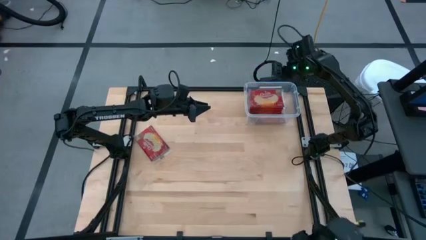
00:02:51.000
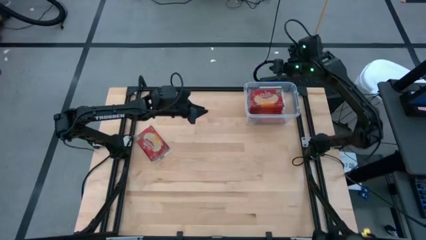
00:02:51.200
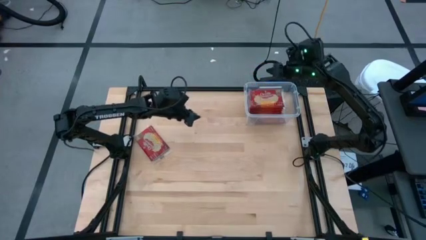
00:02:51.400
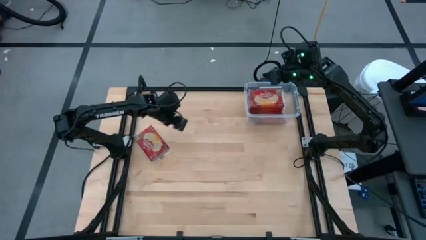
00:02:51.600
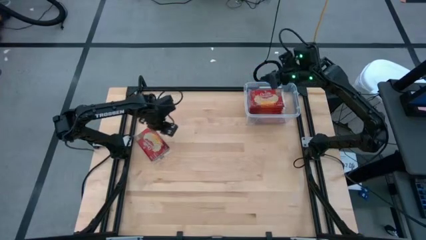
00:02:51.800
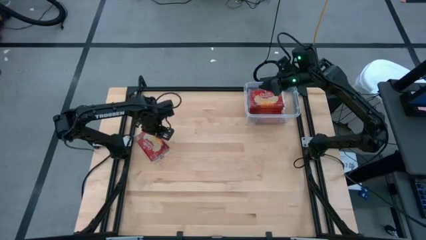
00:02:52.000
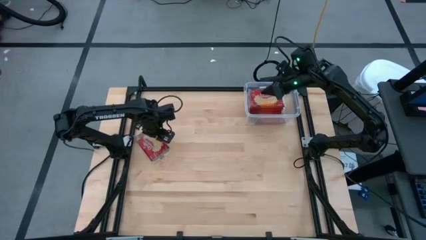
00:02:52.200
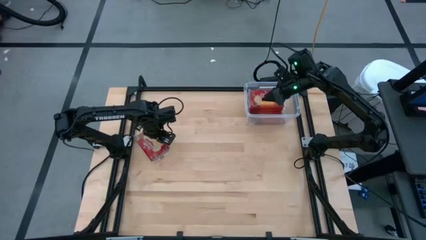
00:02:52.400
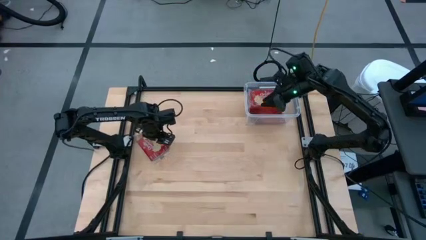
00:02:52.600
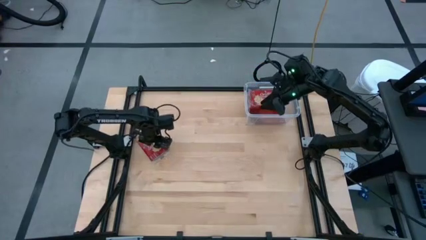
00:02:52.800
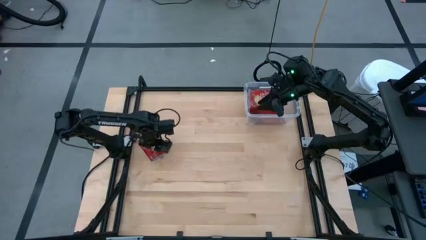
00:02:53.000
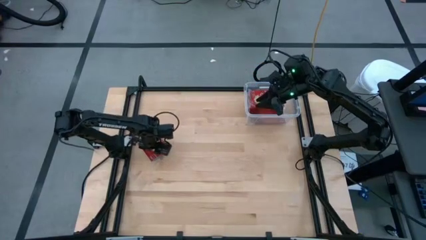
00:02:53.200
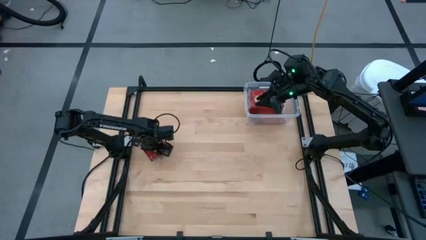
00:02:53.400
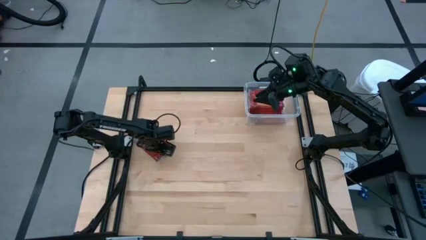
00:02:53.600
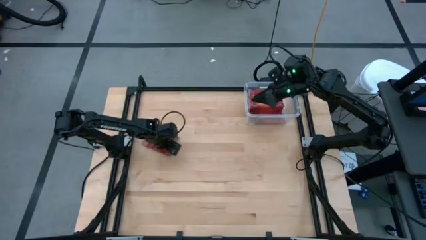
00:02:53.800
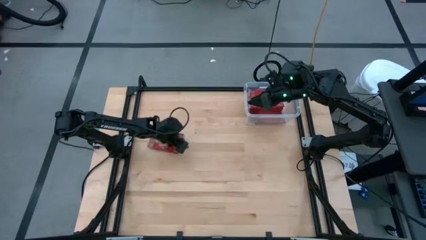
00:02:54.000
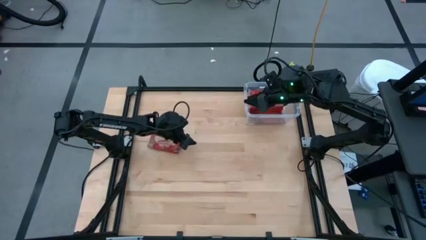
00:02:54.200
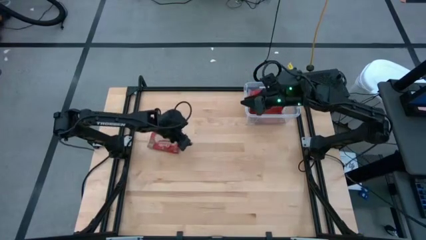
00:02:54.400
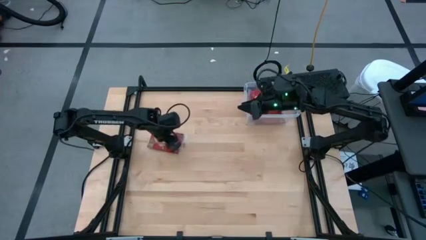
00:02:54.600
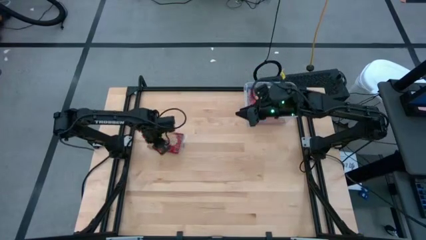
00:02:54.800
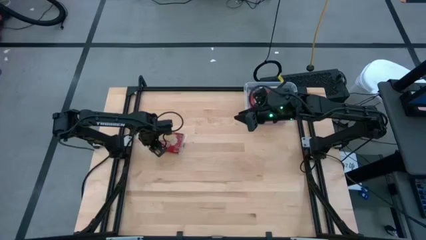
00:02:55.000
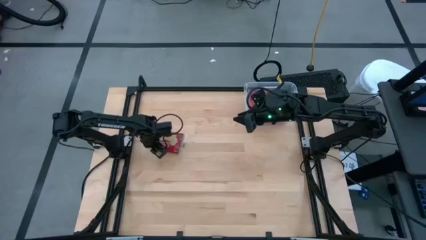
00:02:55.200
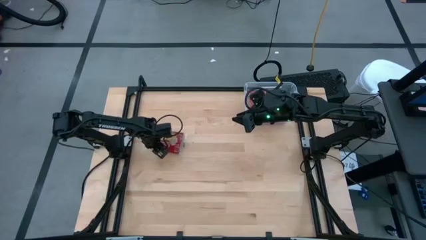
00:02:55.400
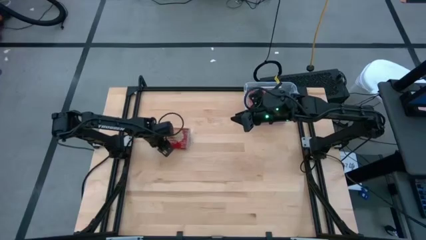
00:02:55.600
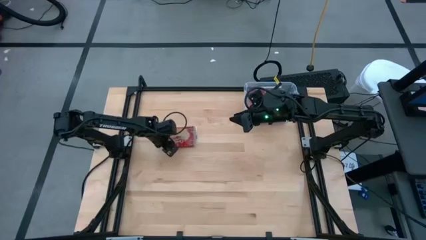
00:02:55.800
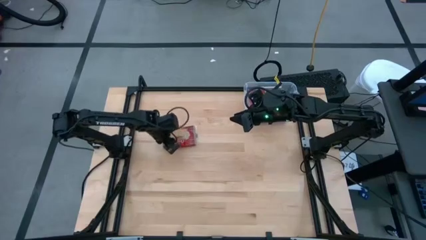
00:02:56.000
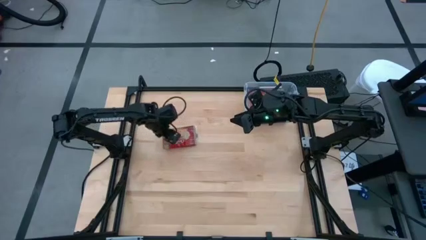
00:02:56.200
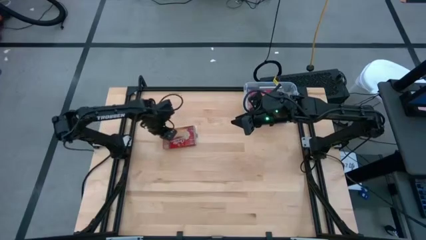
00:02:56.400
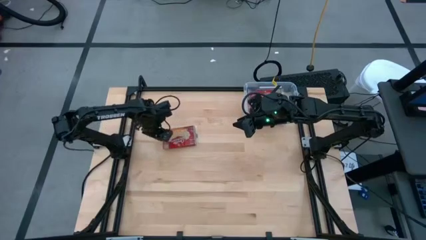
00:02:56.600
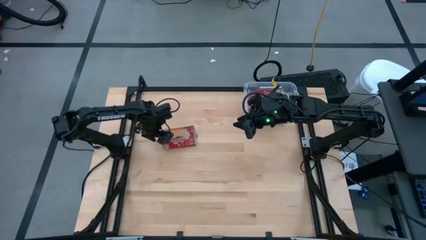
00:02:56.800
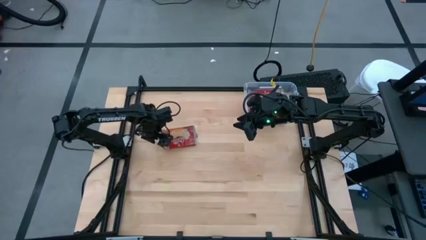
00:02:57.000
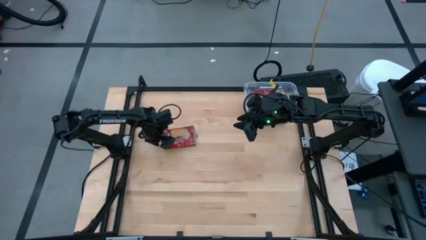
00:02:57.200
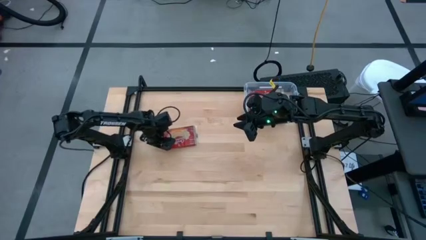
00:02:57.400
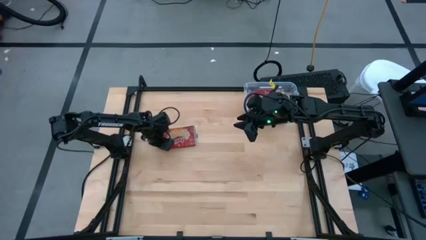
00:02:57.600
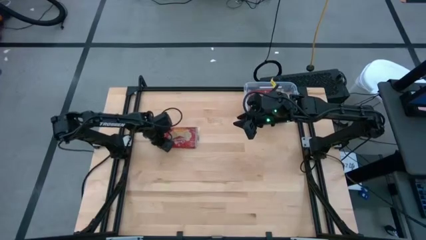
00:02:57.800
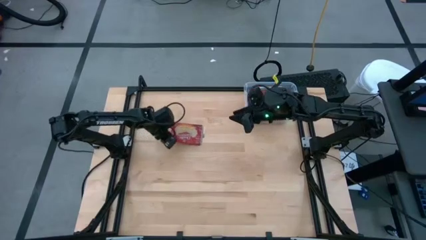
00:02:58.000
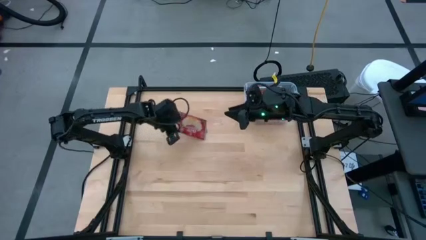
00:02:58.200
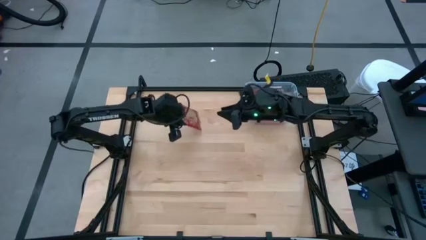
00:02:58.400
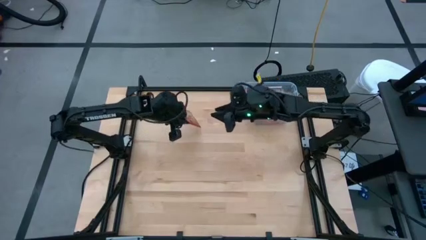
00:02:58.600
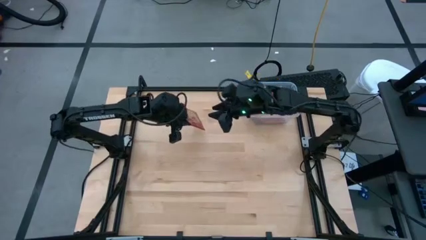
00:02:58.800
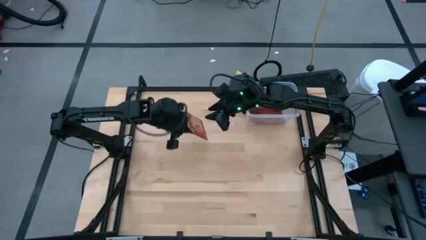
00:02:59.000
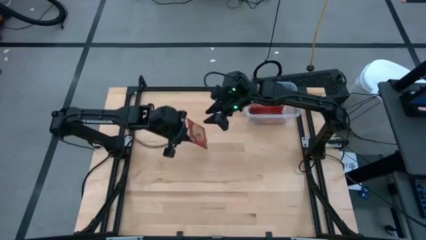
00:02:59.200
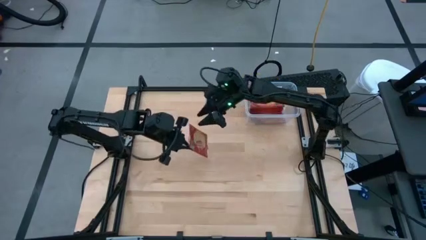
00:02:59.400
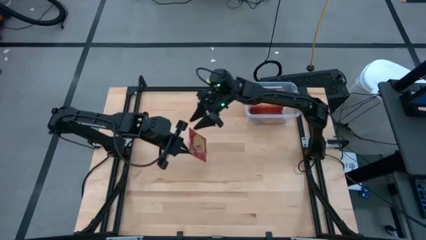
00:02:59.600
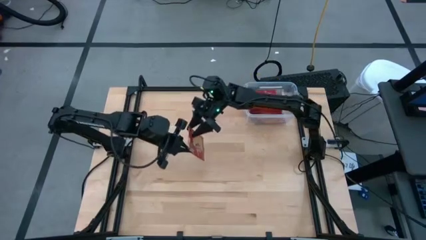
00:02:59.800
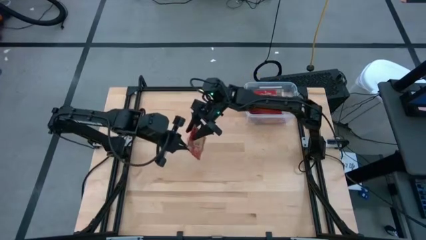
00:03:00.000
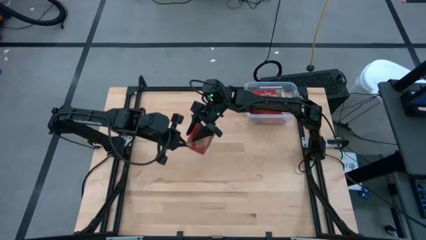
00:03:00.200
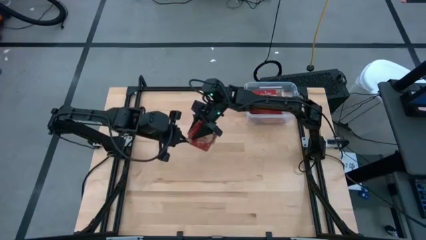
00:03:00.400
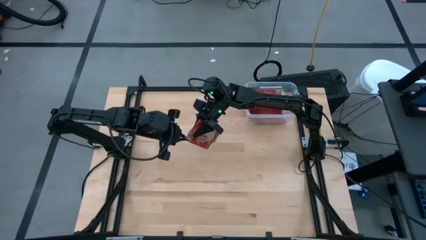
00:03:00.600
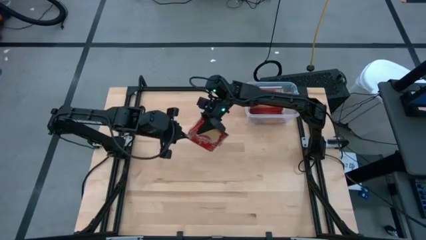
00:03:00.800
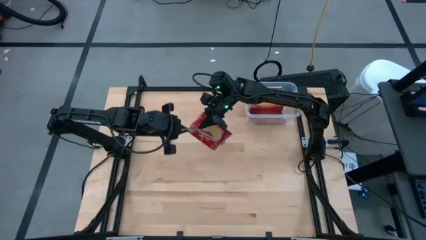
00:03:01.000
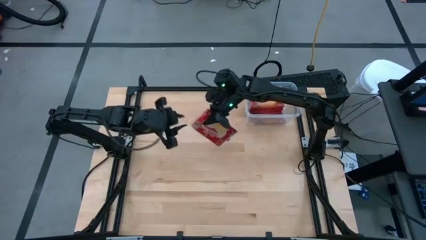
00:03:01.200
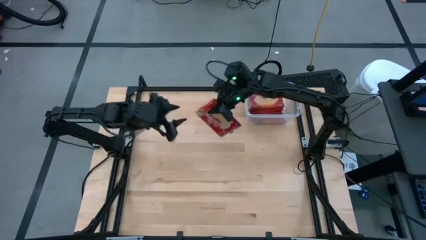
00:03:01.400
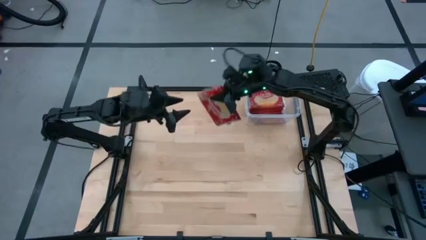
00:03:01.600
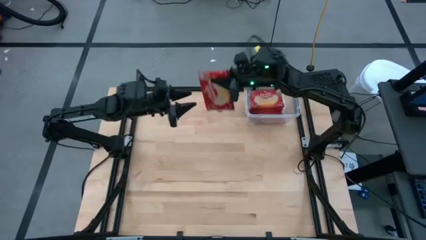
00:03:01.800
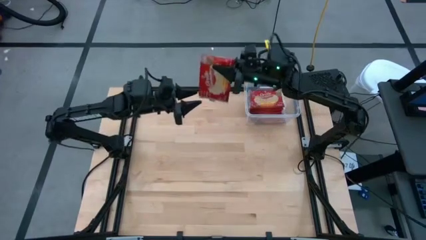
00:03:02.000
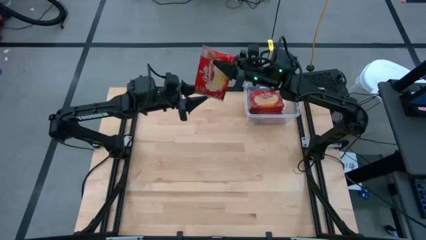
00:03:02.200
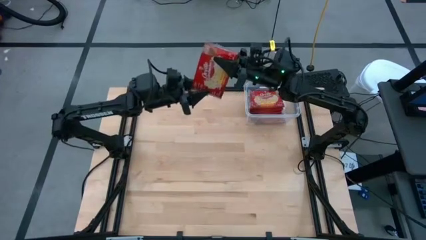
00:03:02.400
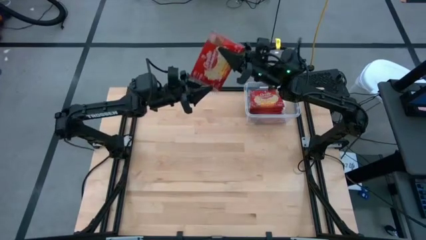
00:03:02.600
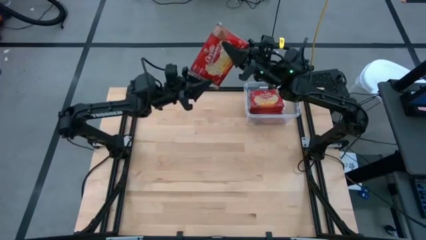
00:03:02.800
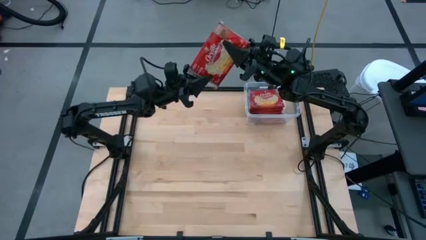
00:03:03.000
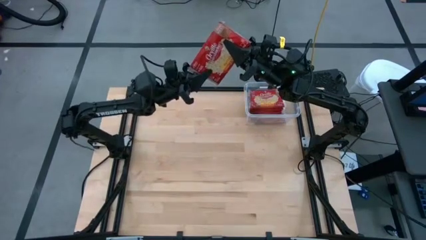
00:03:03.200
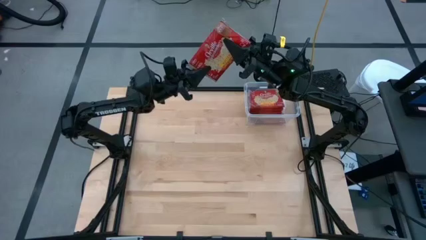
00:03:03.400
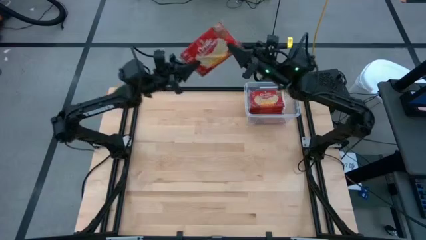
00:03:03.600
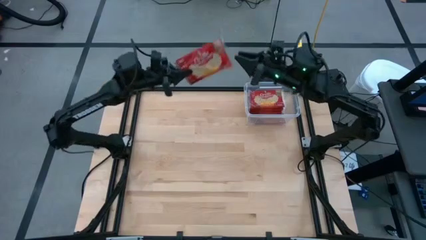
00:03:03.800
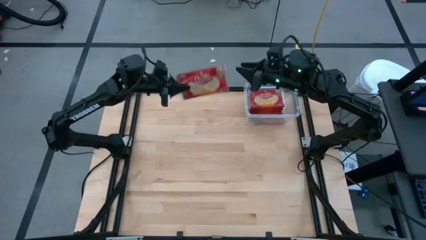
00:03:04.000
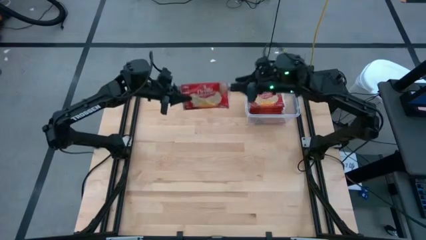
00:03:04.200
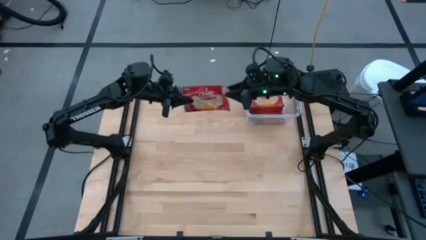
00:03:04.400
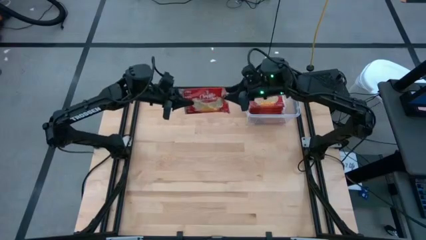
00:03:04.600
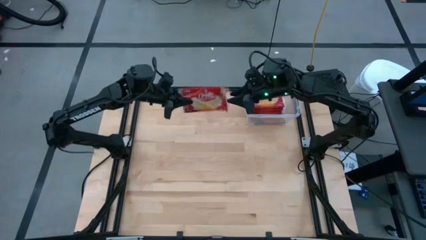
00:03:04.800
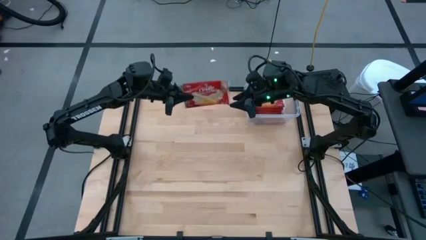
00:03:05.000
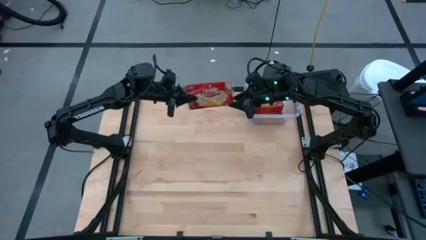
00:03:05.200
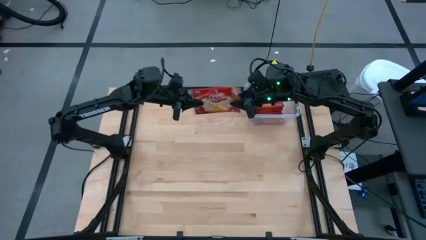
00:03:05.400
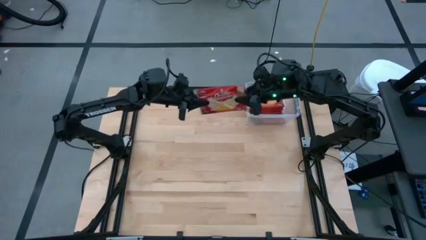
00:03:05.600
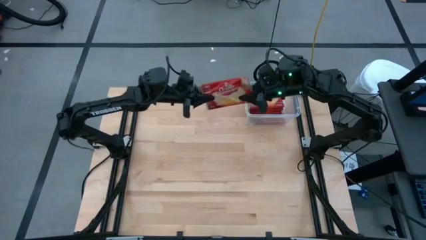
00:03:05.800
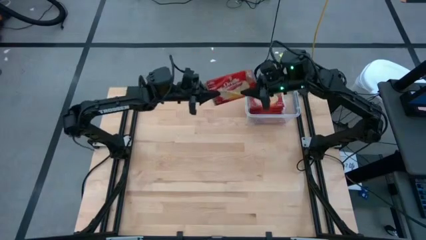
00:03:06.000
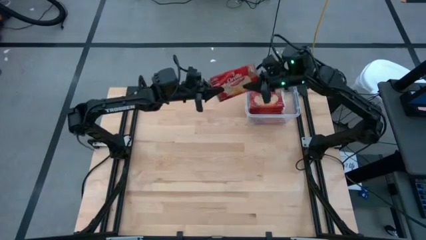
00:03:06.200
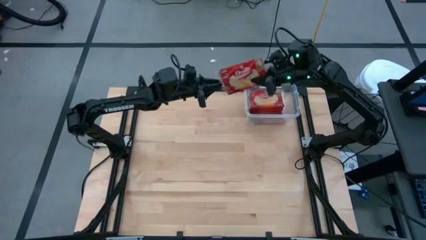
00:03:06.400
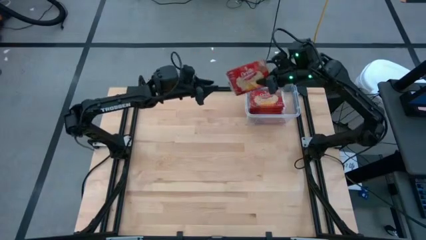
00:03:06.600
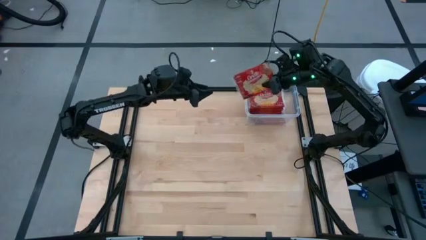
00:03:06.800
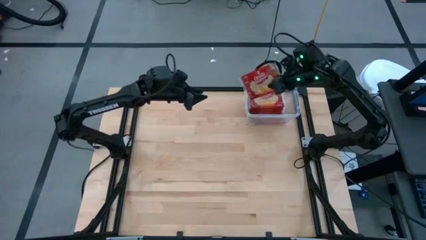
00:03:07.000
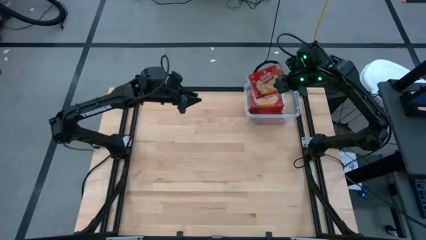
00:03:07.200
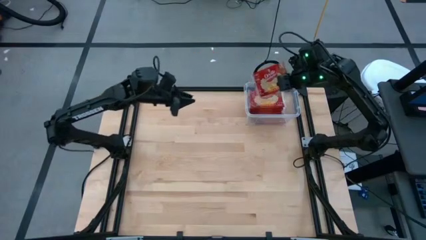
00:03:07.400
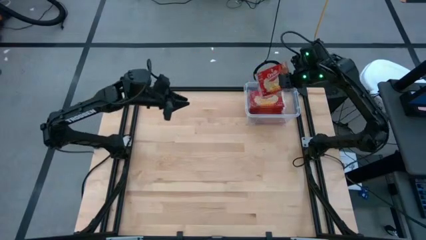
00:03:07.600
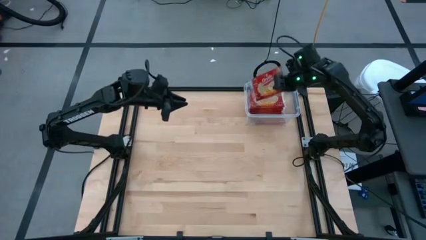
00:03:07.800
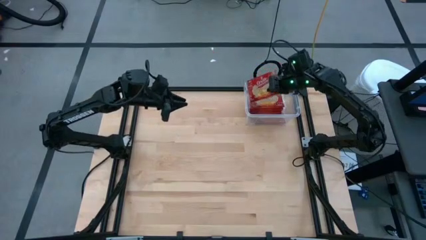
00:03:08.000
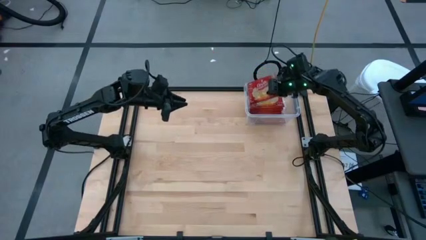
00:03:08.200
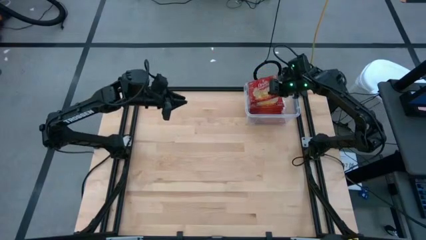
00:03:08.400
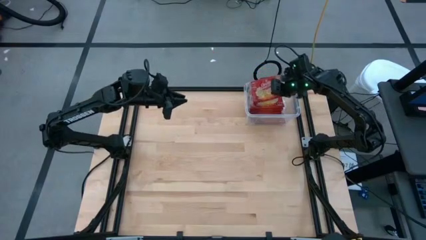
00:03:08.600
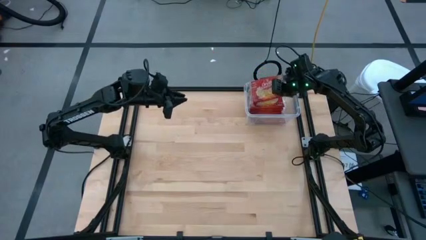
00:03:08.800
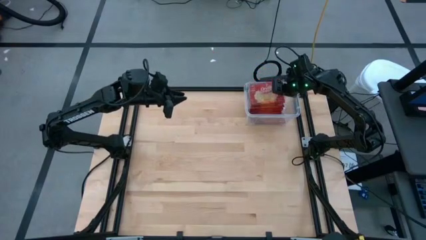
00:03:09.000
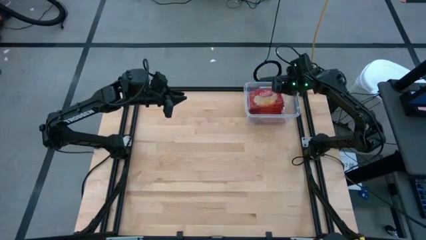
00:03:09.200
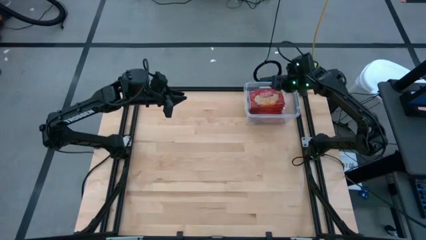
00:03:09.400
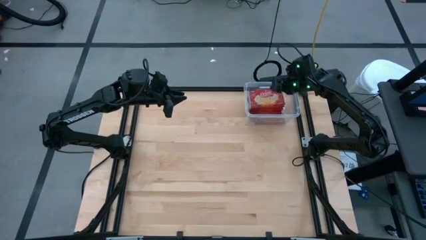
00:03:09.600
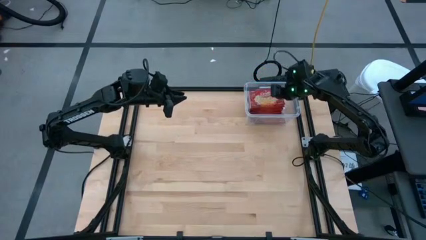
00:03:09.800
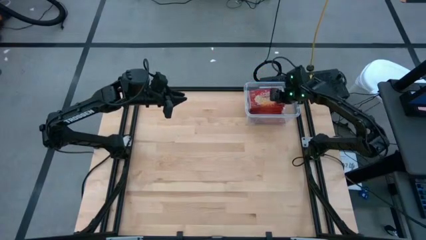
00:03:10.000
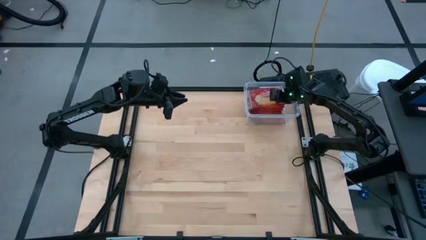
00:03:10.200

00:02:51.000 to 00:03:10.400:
Task: Sort popcorn bags into baskets
Put the popcorn bag into the transparent container
